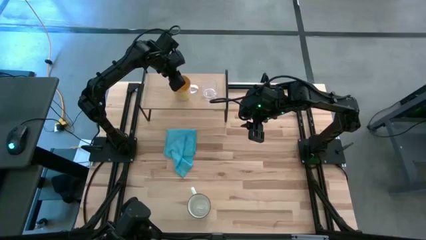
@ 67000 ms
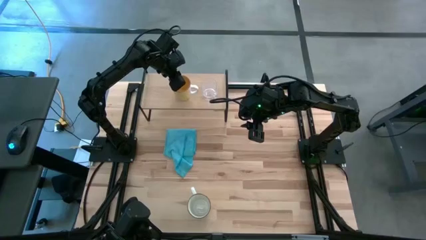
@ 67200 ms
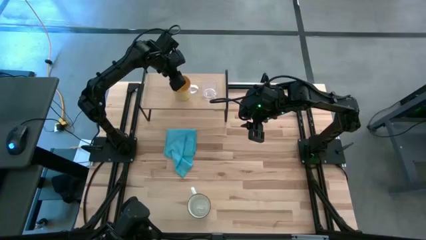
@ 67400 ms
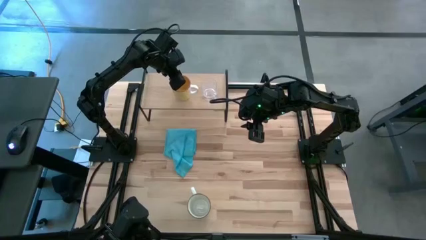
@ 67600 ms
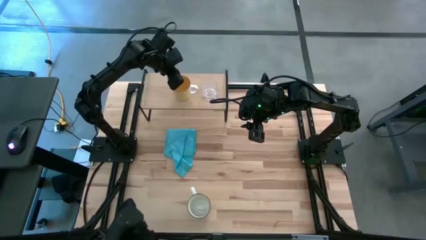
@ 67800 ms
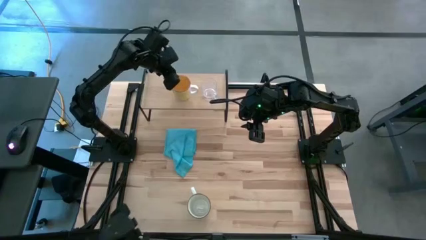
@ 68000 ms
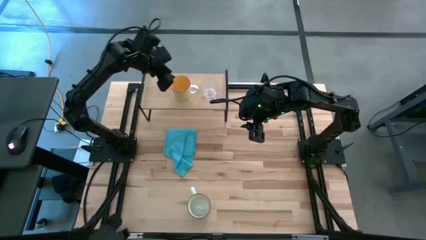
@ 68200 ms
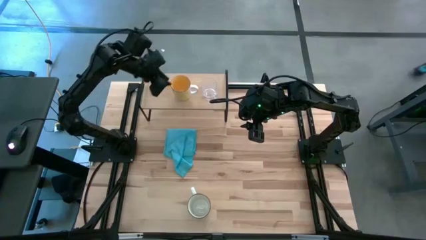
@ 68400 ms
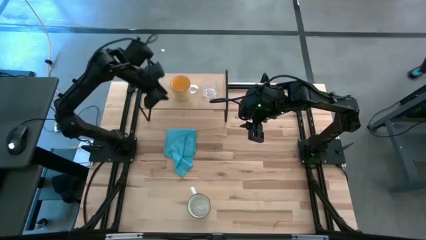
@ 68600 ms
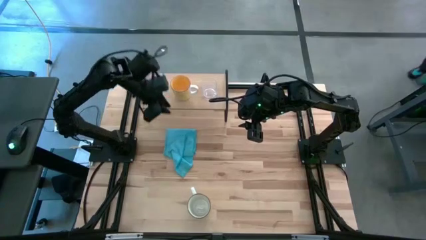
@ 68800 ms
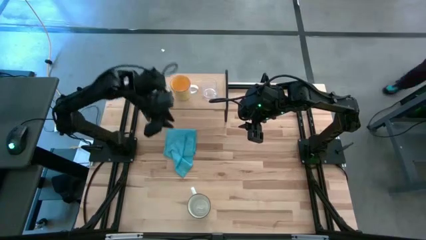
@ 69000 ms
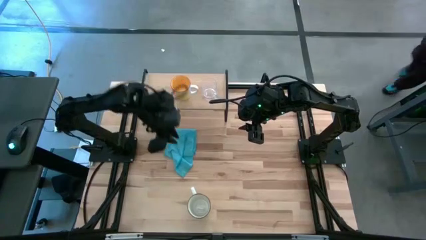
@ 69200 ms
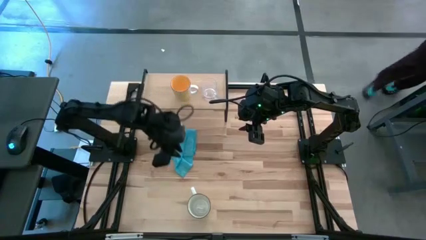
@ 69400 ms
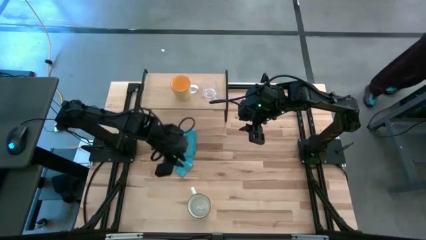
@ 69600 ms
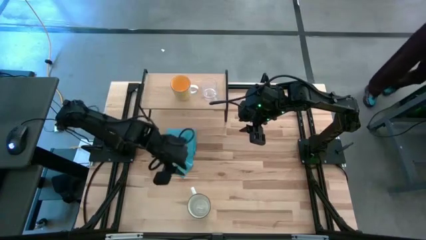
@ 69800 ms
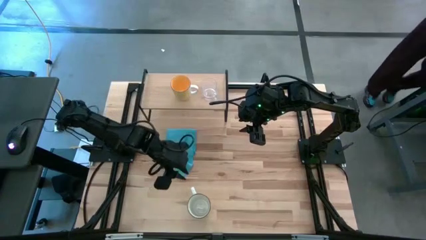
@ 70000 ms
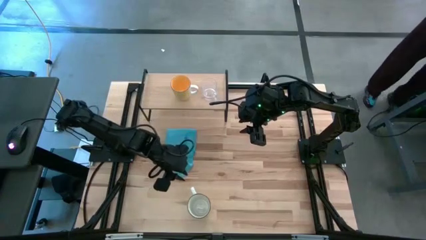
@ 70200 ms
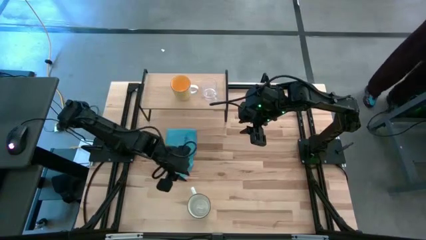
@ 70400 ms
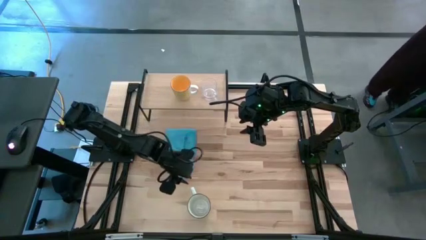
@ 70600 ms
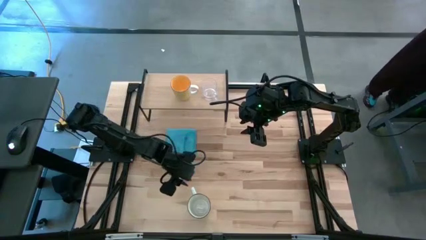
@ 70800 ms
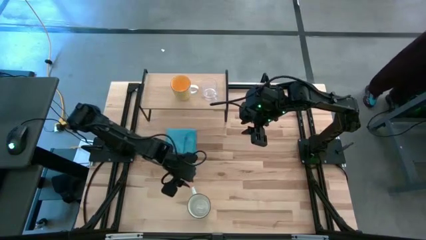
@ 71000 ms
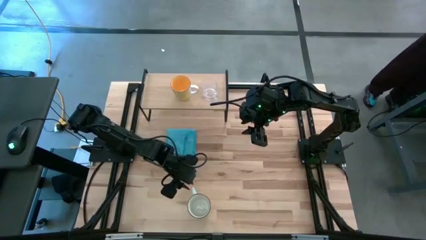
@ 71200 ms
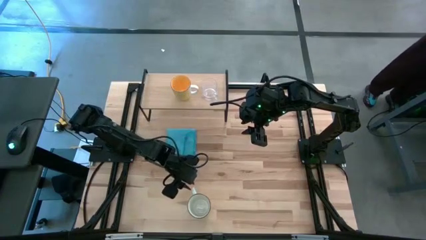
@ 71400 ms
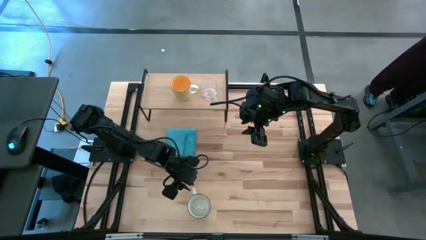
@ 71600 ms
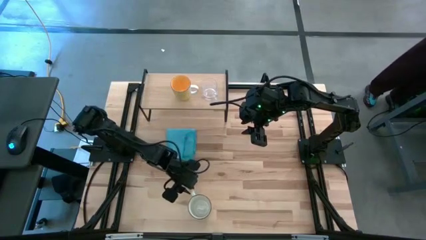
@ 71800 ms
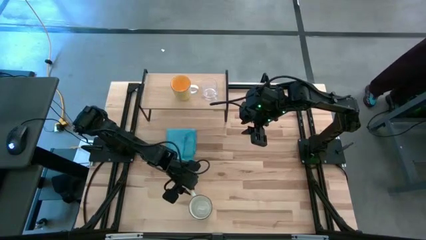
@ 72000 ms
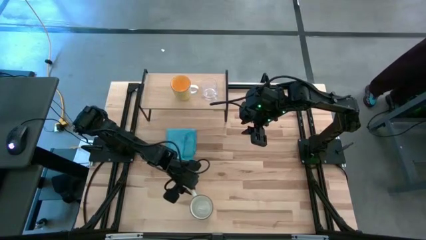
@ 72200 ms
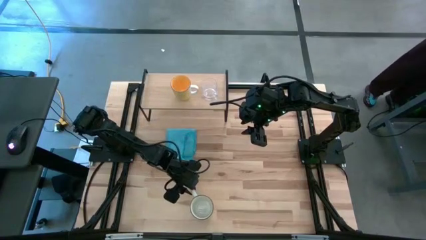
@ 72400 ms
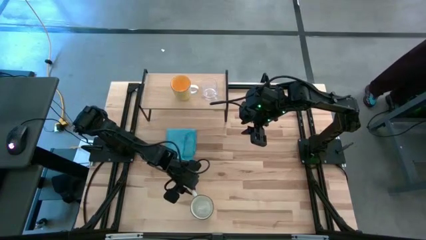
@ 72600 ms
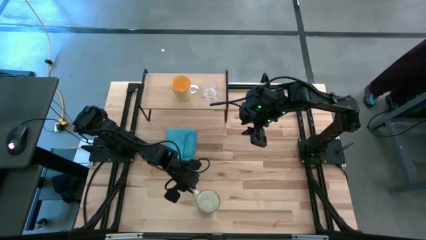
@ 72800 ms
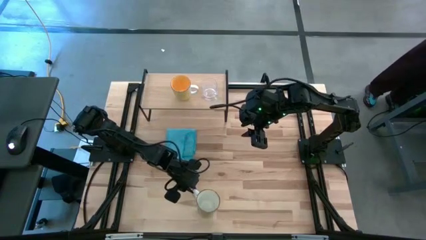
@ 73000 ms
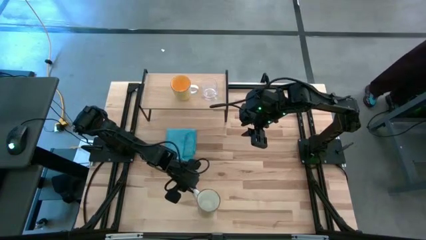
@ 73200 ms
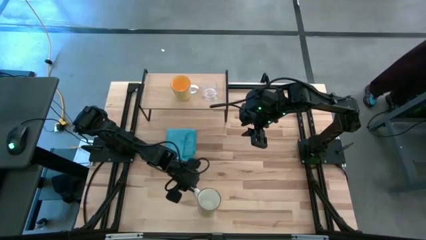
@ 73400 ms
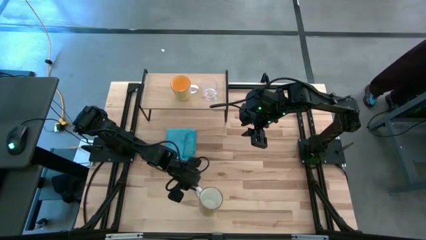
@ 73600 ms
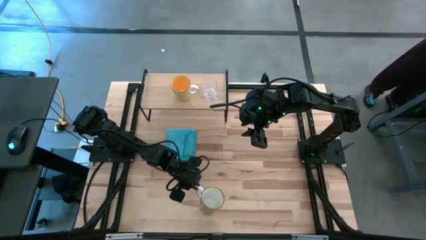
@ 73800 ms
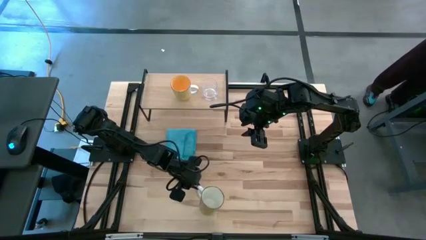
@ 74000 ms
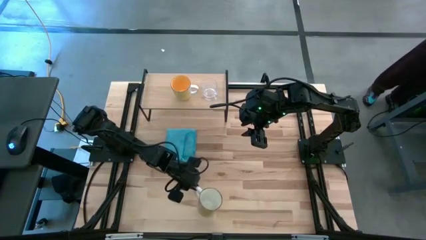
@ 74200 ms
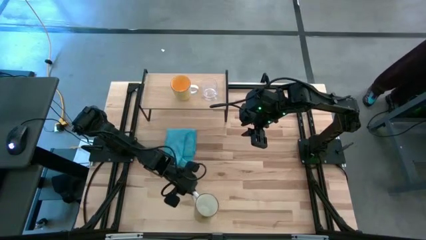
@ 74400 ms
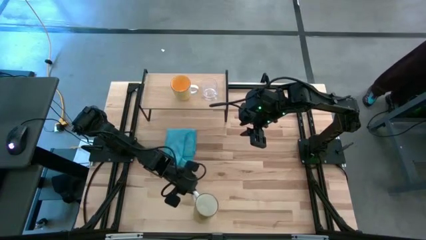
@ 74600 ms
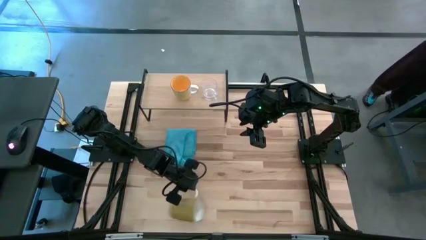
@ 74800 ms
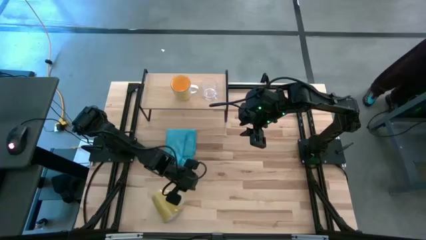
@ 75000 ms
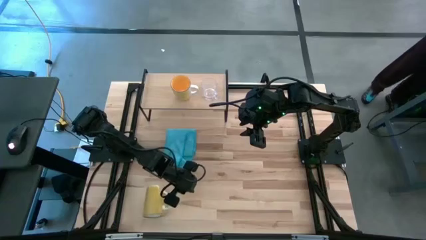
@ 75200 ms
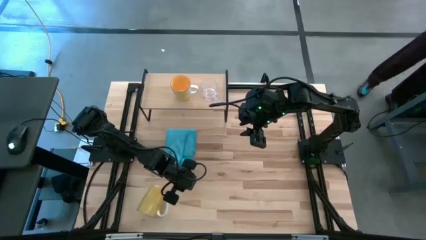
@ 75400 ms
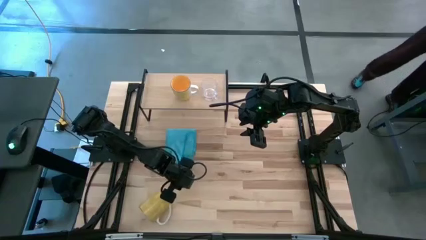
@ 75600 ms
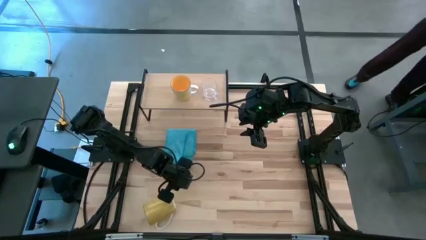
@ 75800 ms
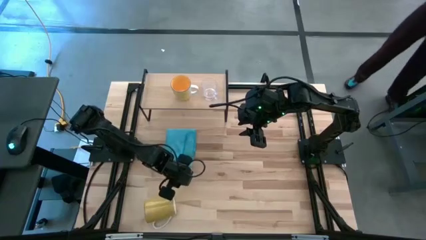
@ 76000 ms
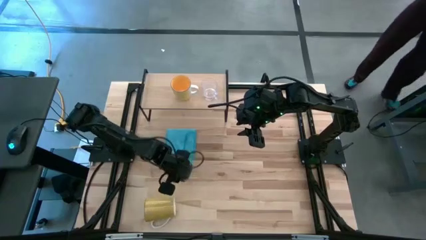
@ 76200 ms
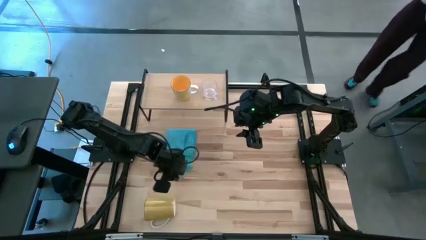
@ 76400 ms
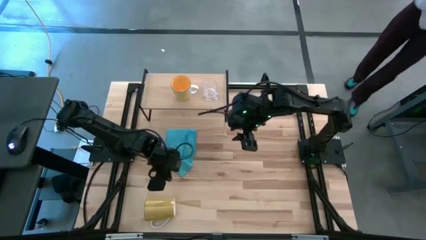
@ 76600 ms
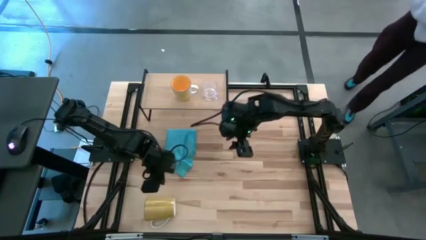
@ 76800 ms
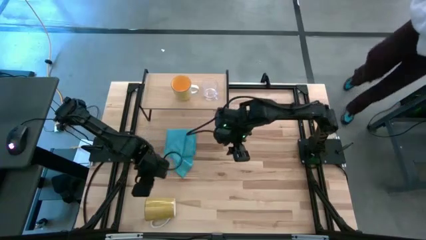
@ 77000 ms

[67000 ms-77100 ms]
Task: Stack small to large cups/mugs on shelf
Put the white mug on the shelf

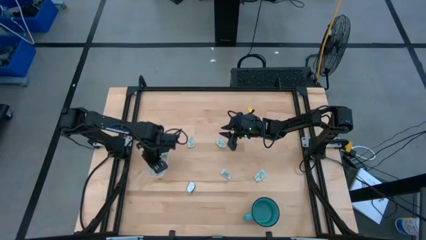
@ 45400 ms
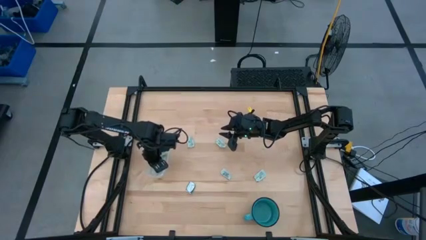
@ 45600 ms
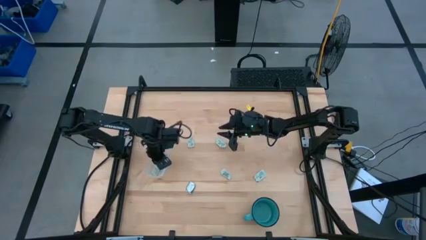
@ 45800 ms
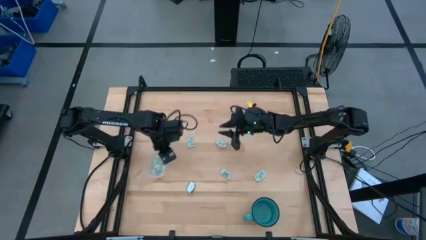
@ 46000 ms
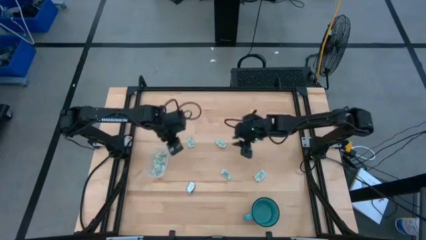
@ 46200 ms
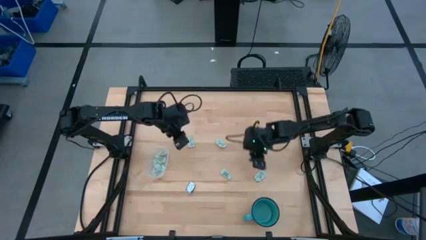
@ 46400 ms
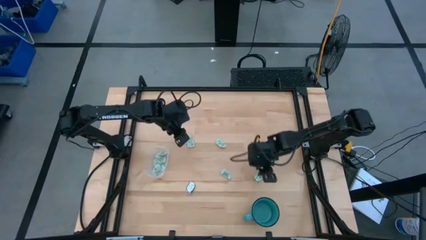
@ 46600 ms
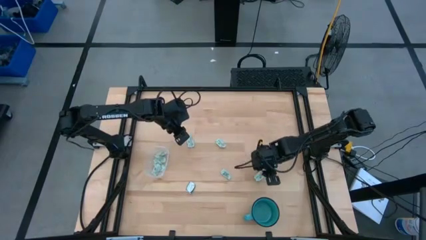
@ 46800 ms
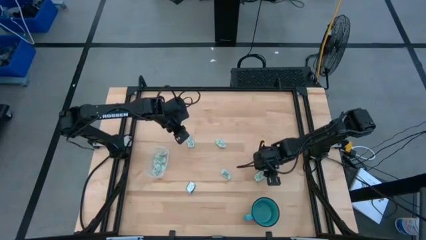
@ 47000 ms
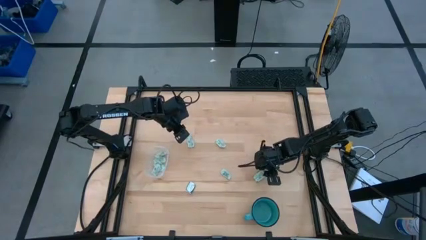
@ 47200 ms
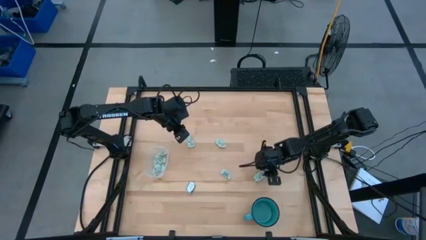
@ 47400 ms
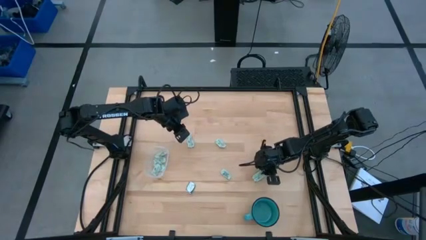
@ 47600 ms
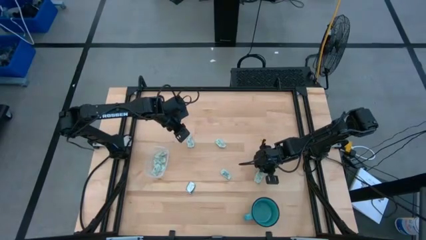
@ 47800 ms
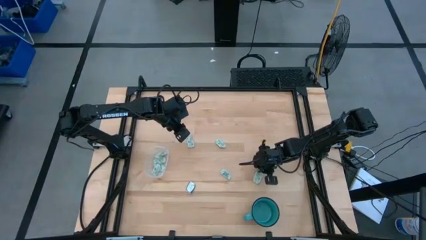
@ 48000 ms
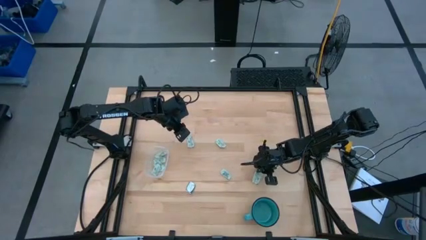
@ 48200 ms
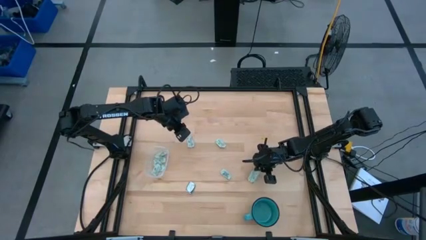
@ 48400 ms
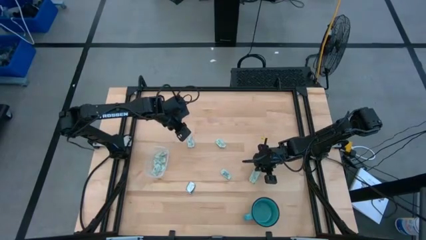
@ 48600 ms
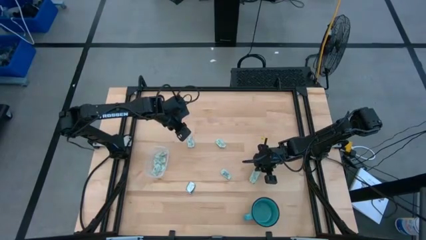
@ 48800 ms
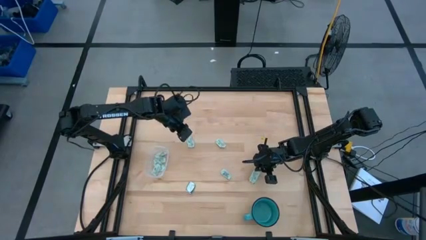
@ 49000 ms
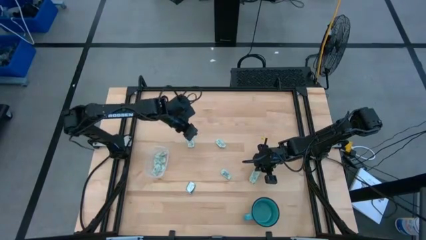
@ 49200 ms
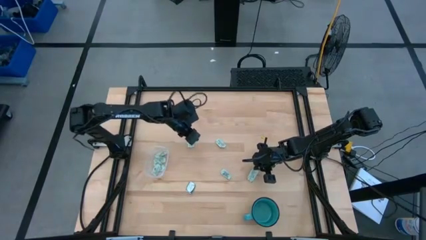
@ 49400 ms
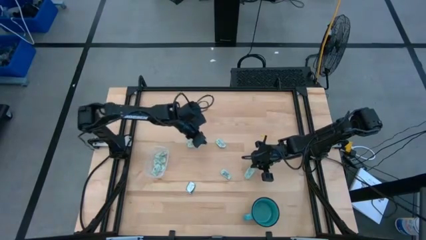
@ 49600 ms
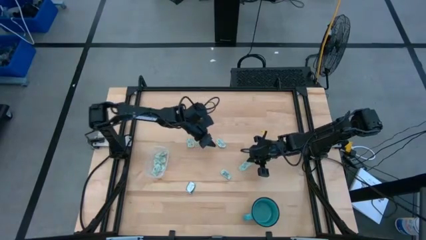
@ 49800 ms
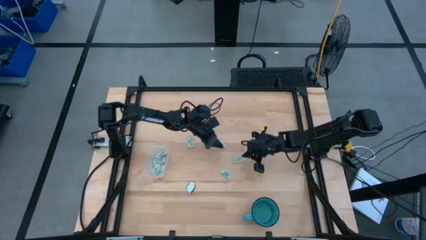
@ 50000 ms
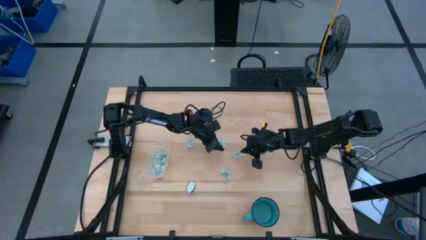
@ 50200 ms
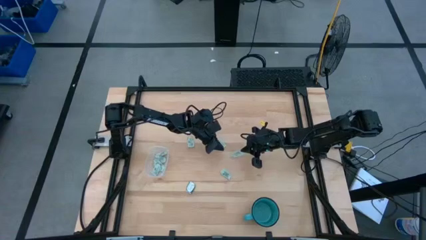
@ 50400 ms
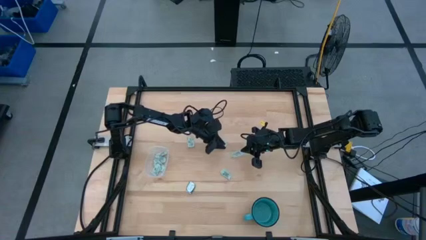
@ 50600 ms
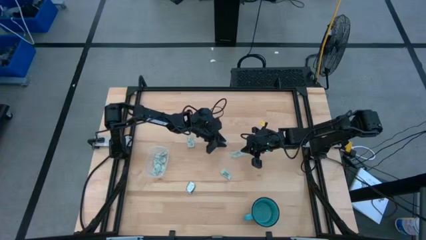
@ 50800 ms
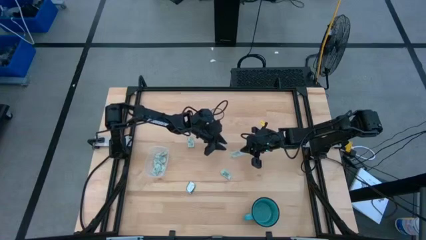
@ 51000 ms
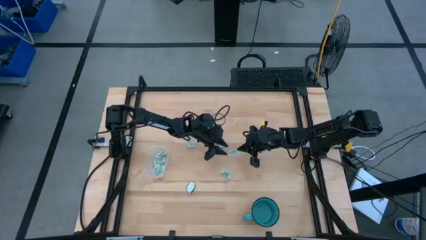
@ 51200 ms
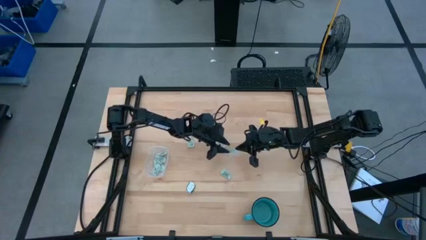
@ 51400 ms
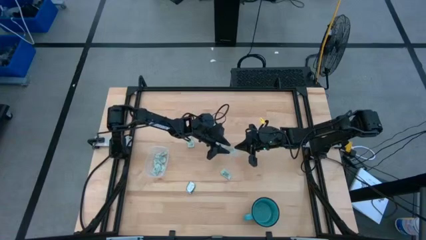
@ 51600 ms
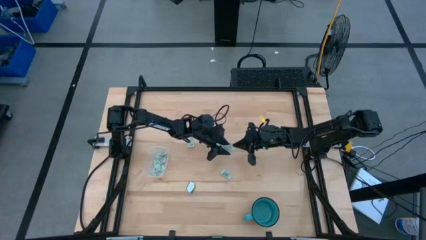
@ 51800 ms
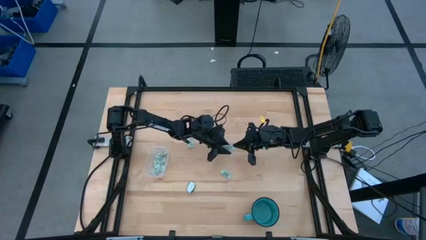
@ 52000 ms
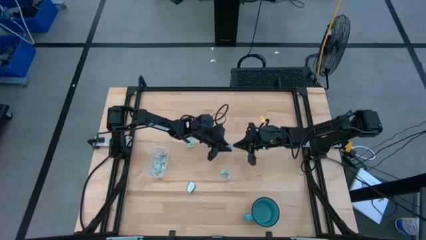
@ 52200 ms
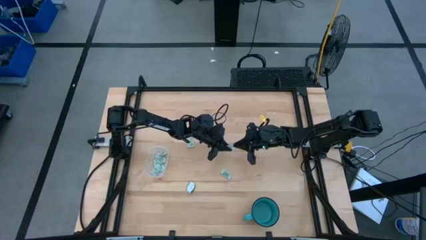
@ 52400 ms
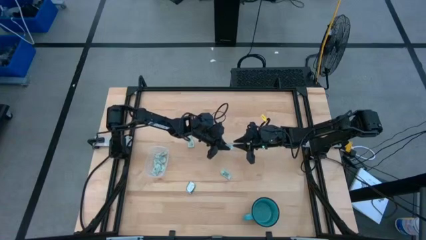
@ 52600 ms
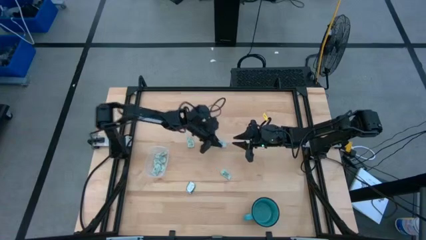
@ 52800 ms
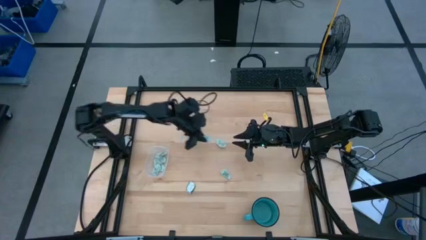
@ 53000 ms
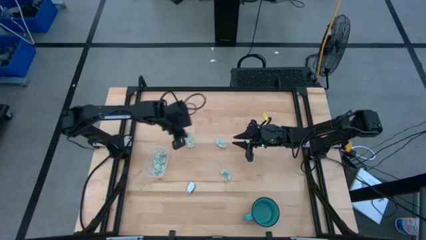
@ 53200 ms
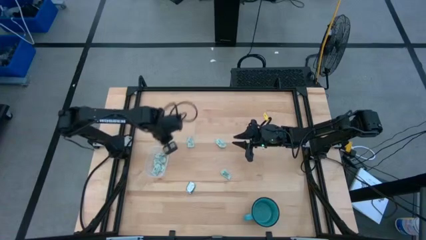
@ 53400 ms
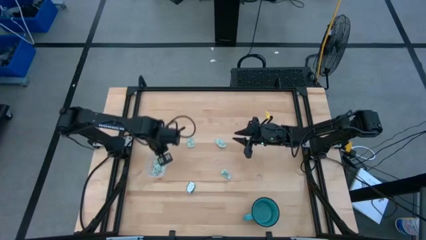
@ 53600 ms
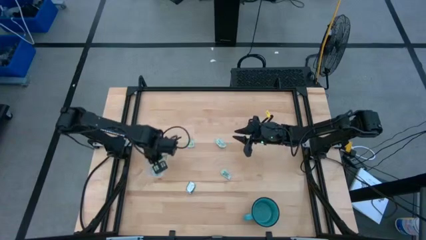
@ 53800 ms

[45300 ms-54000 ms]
Task: Pick and place Stevia / Truvia into bins
Put the light green stevia packet into the transparent bin
